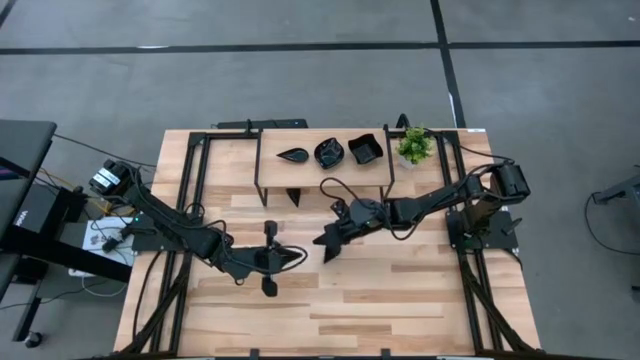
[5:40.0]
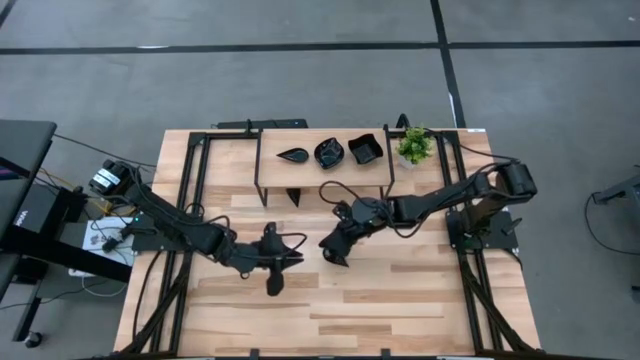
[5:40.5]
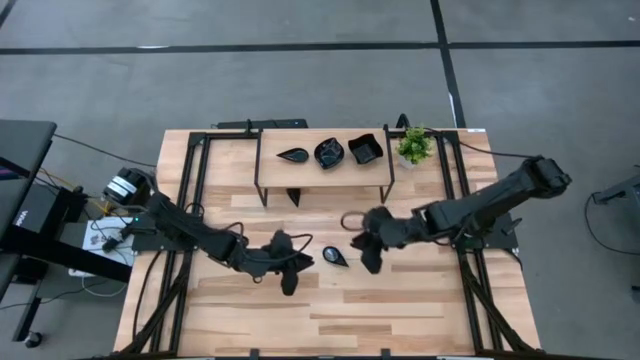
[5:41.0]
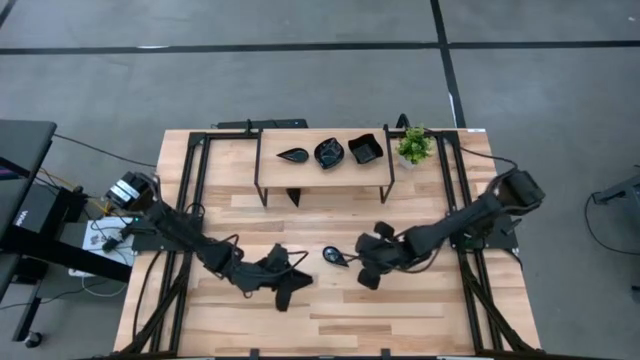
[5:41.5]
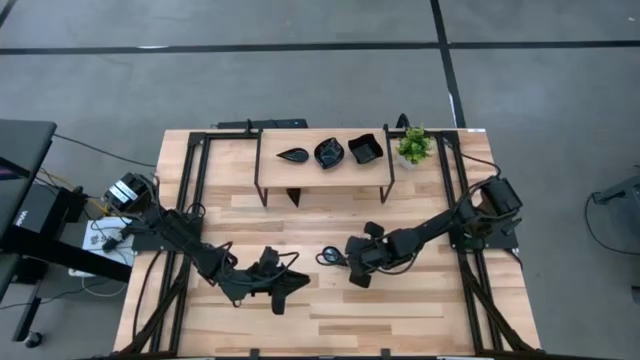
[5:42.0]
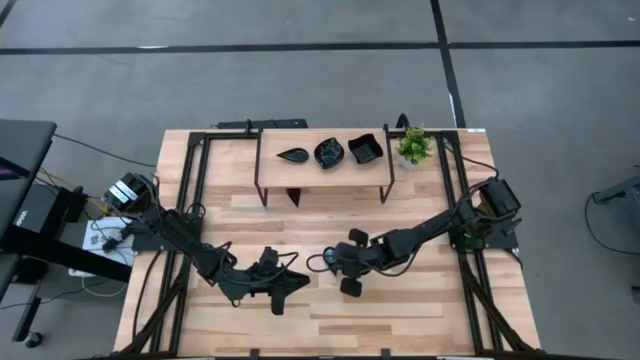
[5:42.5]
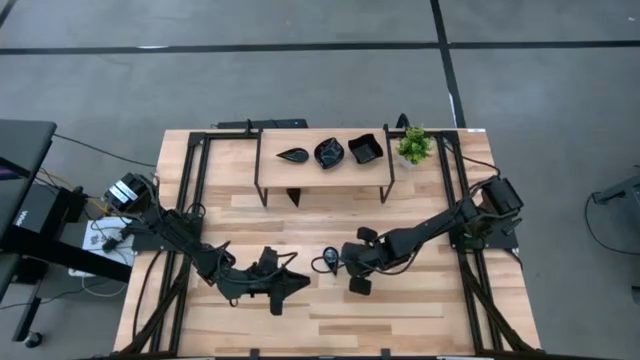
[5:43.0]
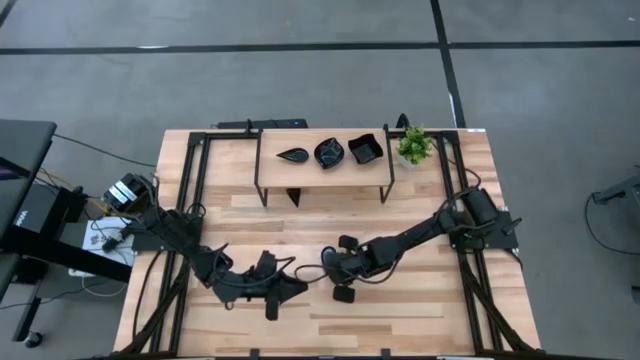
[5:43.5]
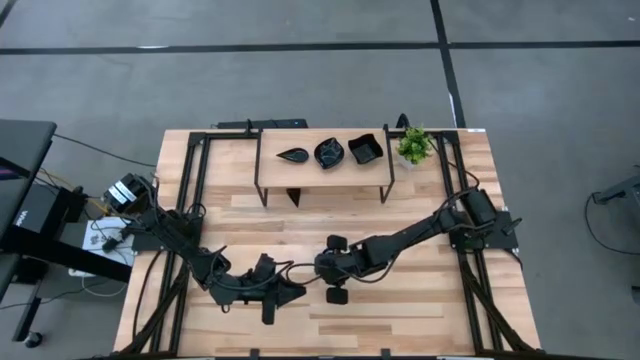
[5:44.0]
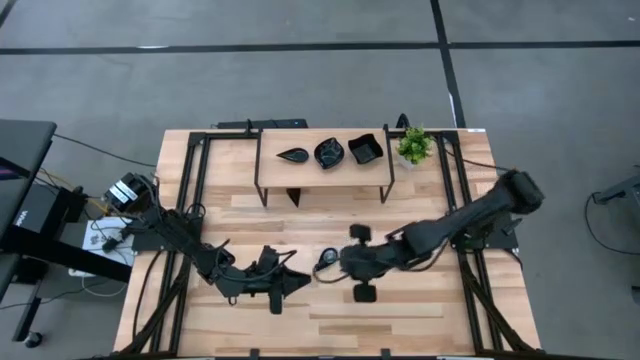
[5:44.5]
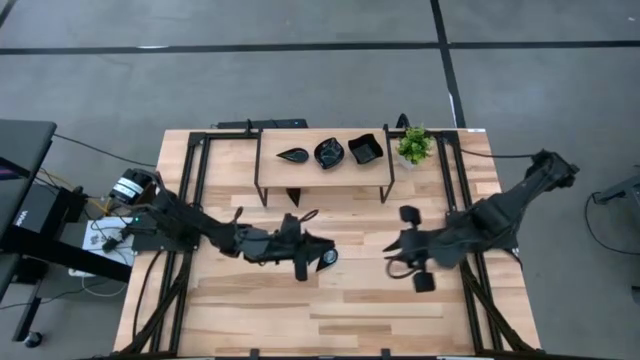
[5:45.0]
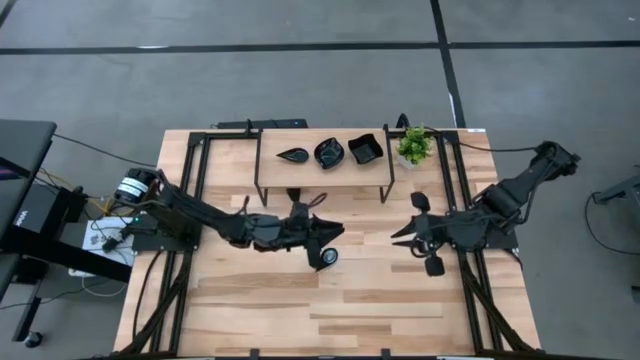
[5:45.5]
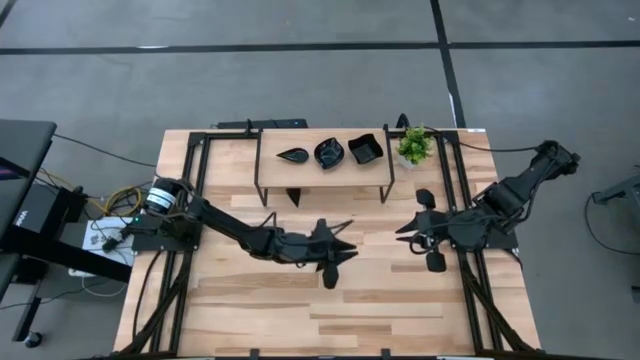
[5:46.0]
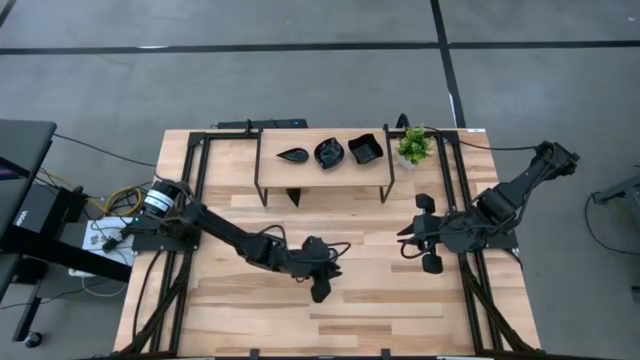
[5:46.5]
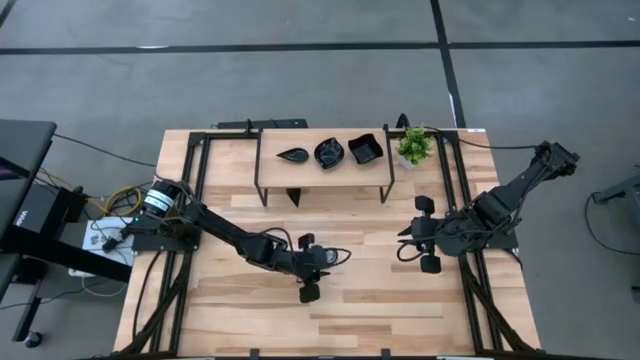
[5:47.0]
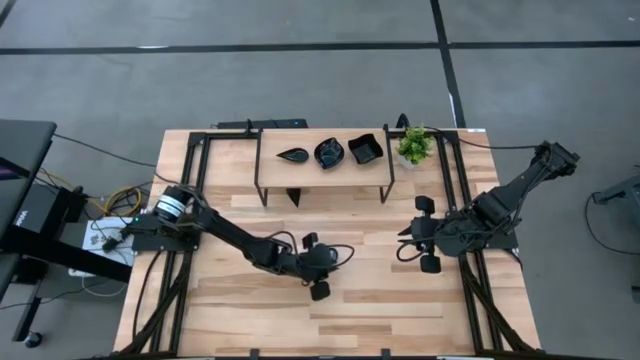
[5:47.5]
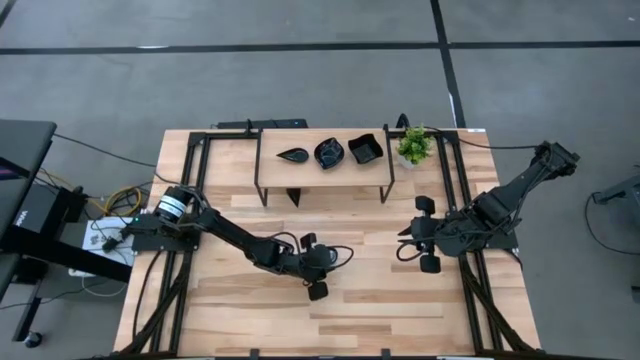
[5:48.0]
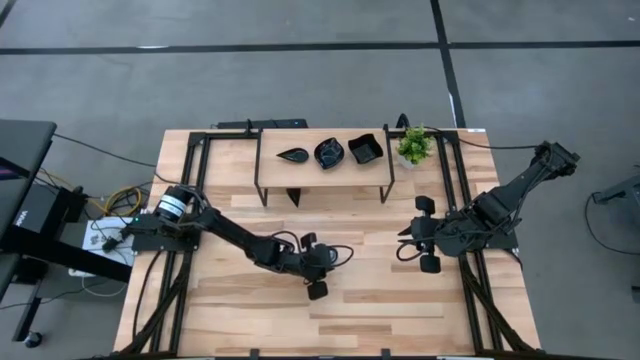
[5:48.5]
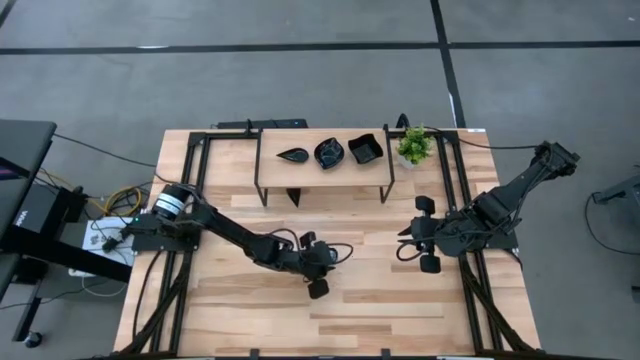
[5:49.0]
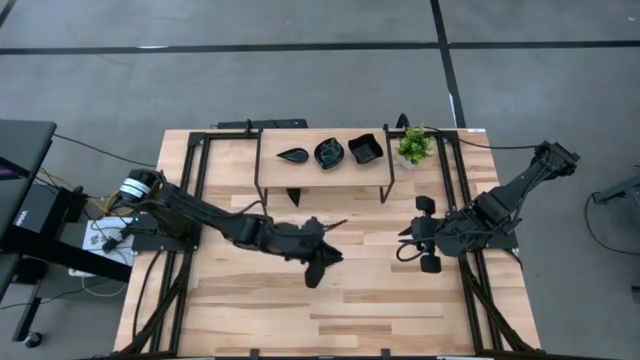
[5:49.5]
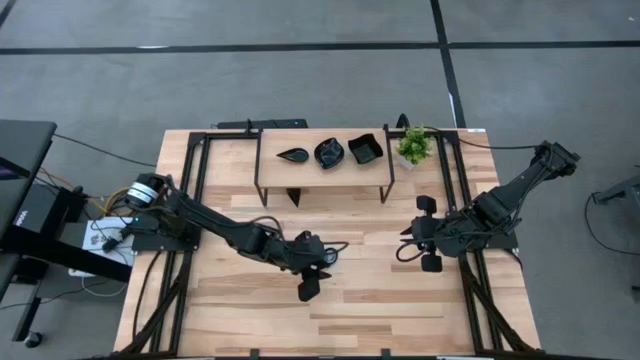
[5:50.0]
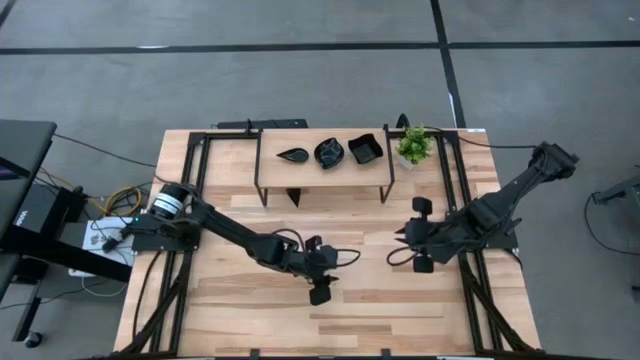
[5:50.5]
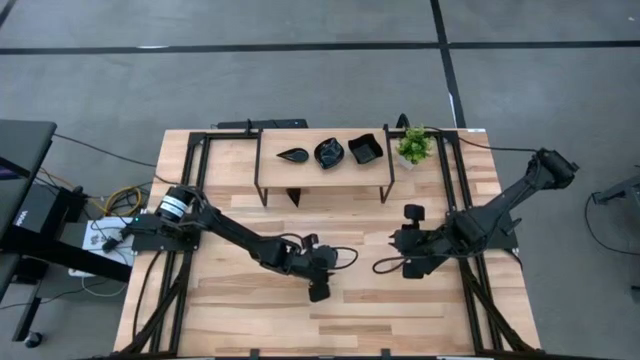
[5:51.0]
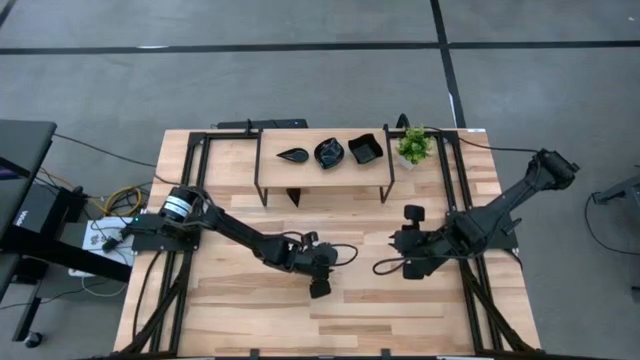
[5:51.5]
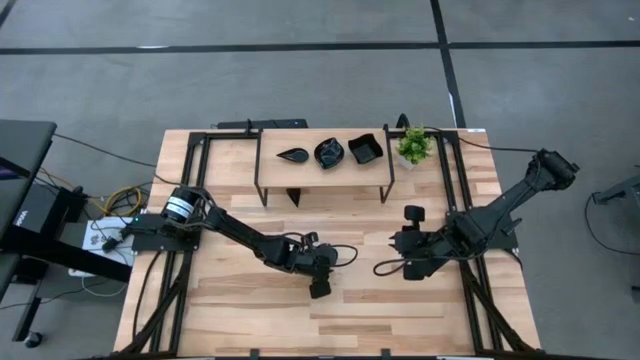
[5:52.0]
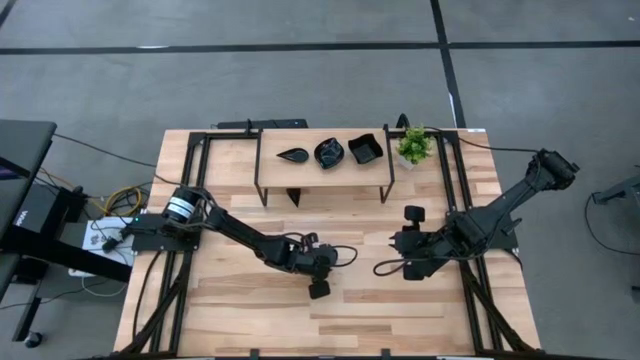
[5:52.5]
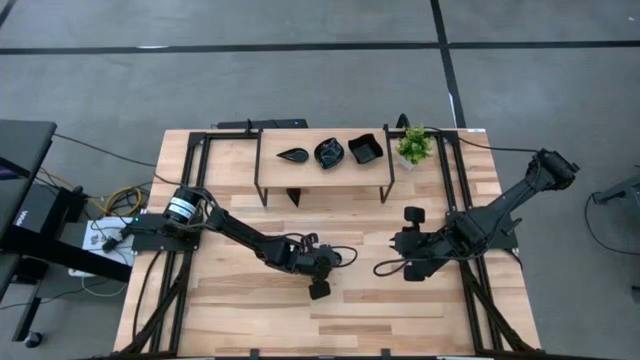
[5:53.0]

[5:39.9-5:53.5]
Task: Pick & Place Mini shaped plates
Stack the black drop shaped plate on the black drop shaped plate on the shelf

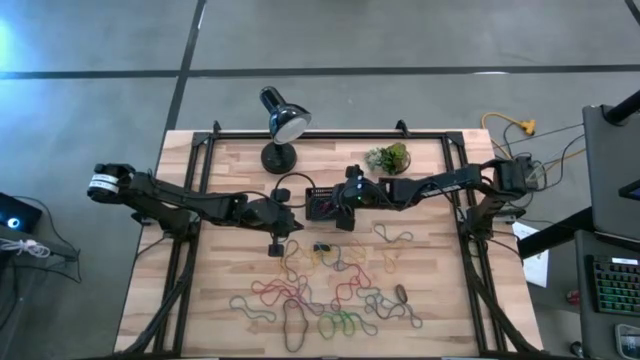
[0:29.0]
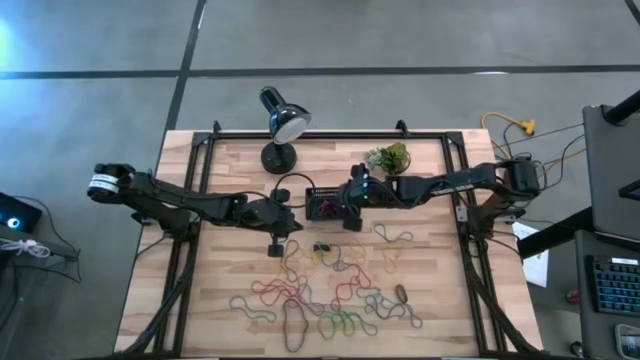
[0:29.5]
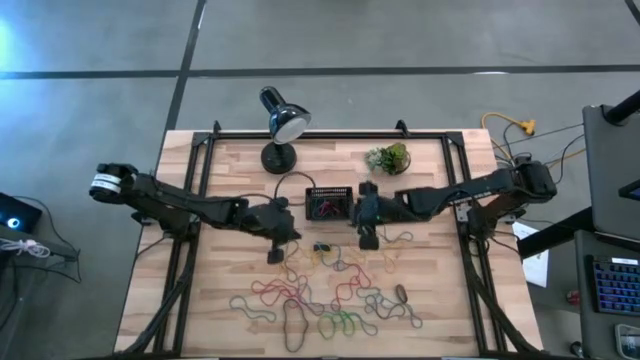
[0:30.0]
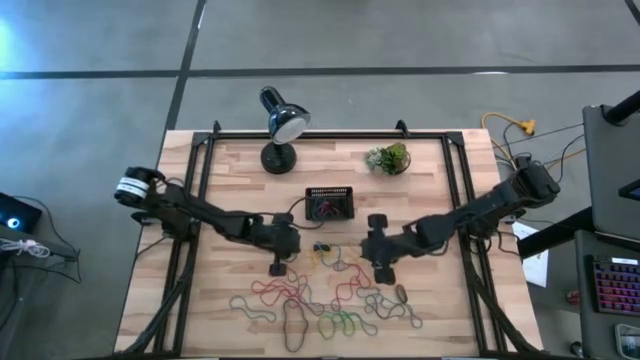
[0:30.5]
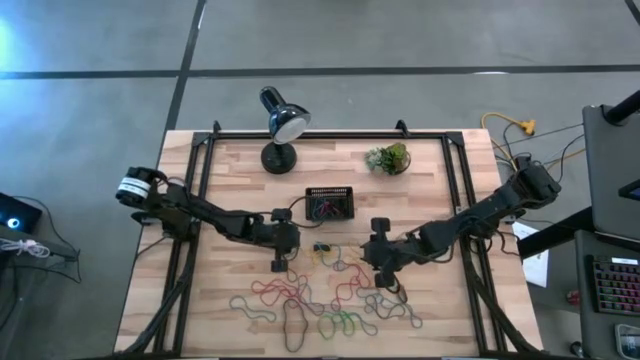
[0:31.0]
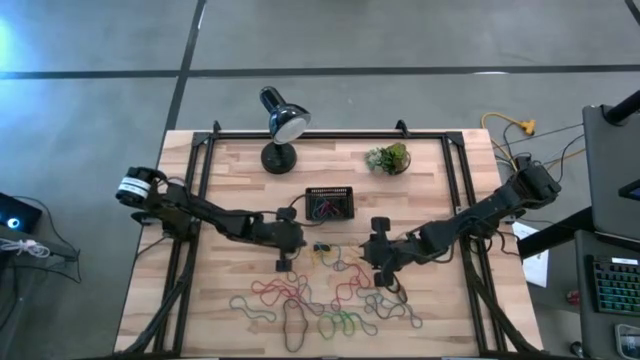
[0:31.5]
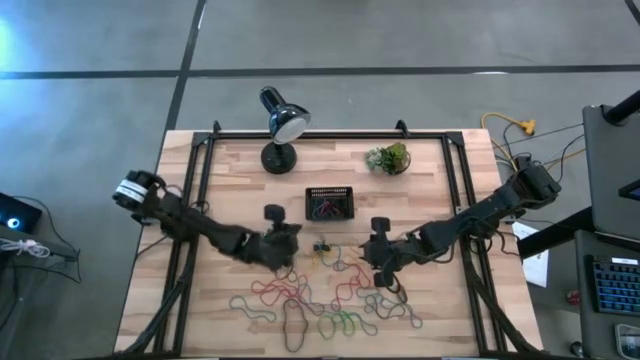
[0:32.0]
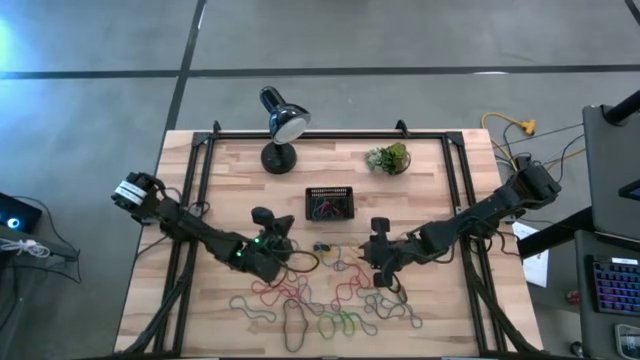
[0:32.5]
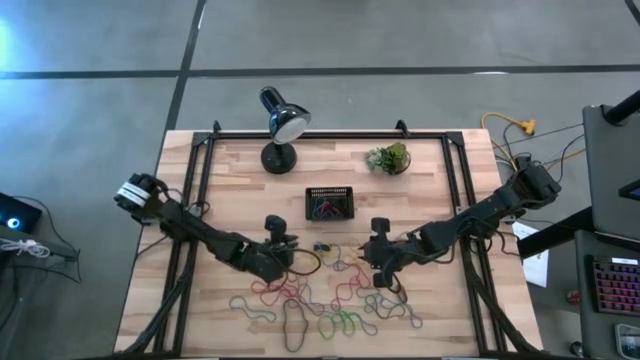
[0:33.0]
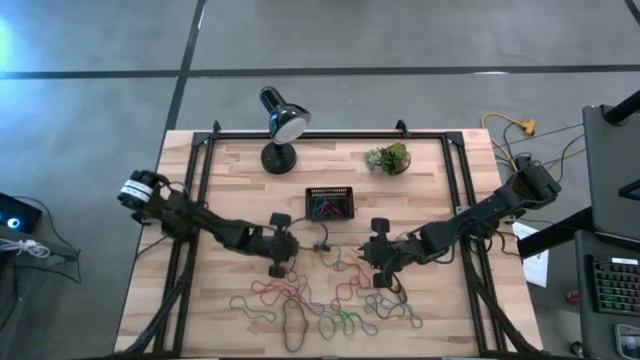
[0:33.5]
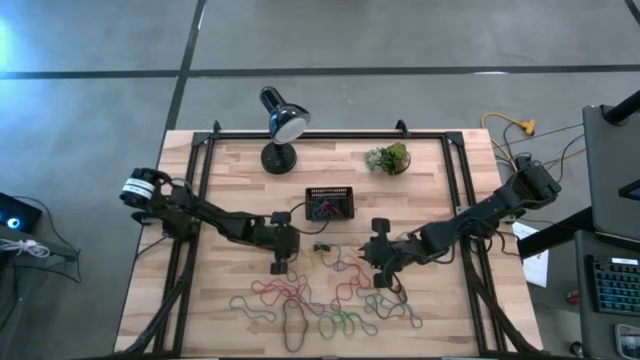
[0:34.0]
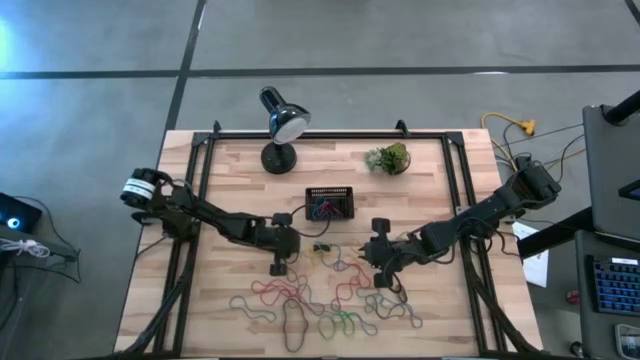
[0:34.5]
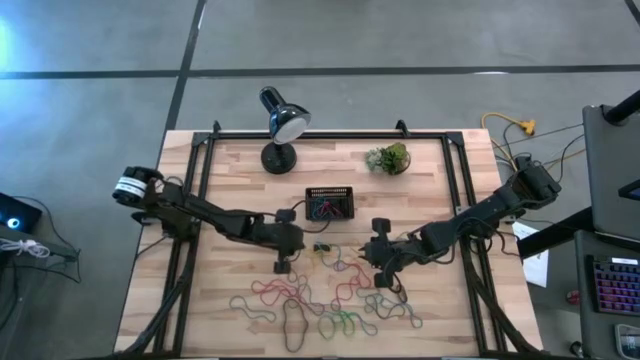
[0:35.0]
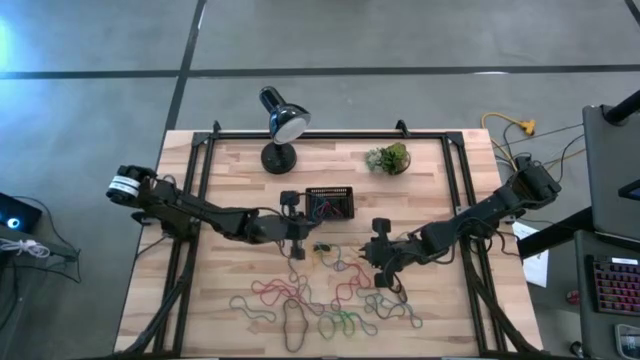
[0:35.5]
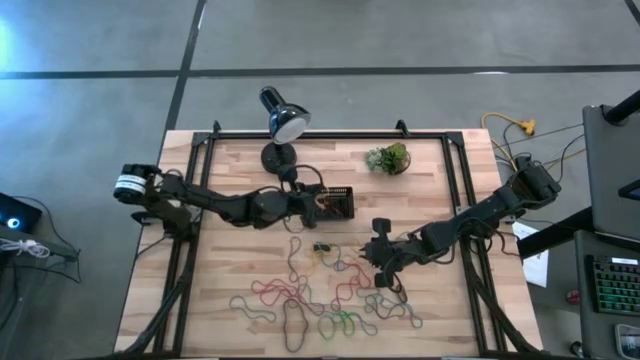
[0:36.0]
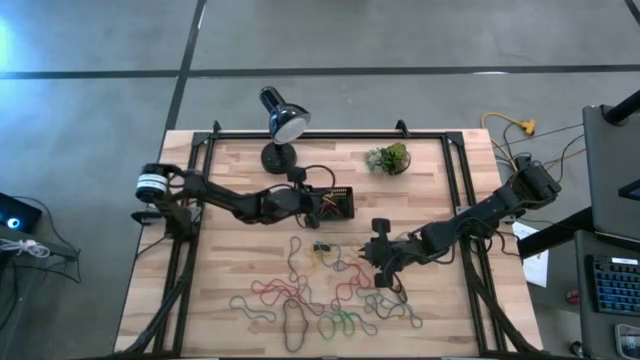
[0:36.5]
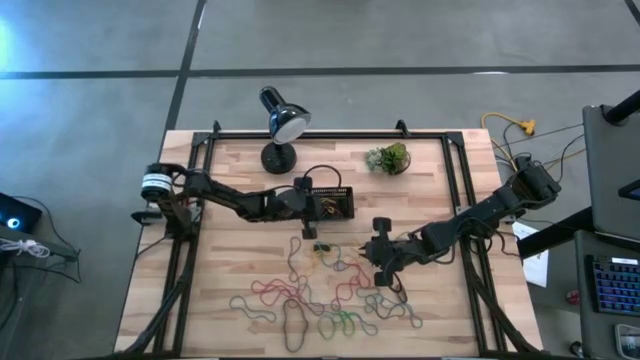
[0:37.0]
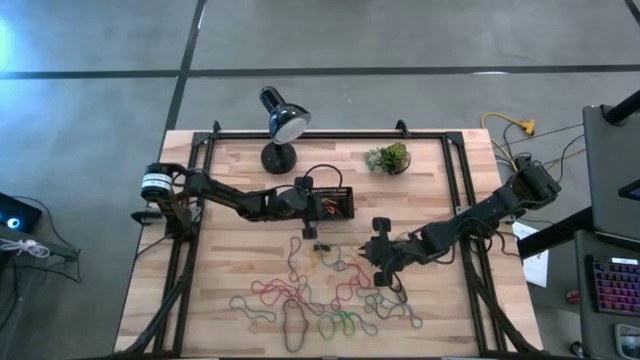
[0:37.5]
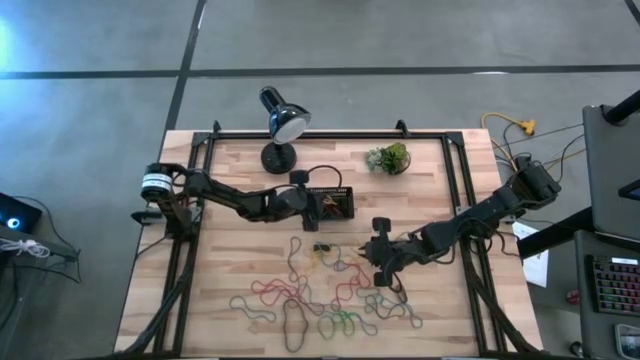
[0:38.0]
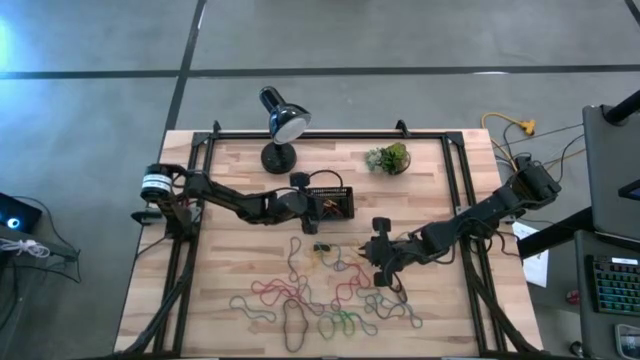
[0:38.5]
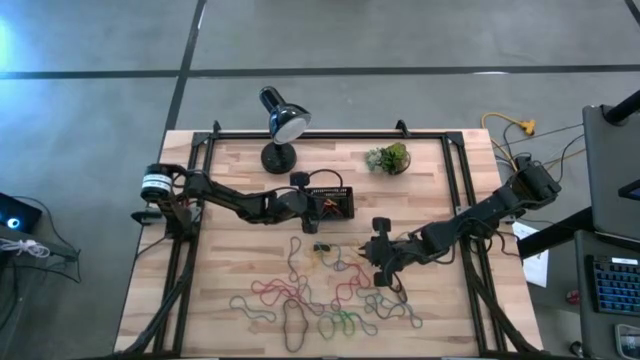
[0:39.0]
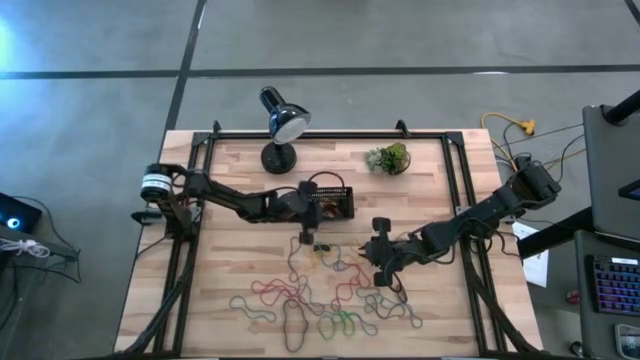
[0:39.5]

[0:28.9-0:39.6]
Task: Pick and place rubber bands into bin
Put the yellow rubber band into the black bin
